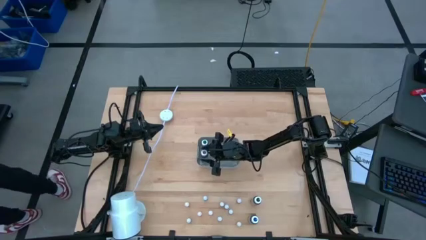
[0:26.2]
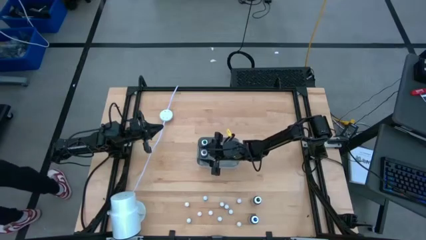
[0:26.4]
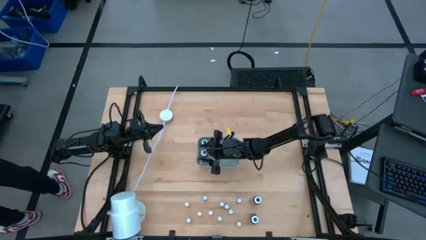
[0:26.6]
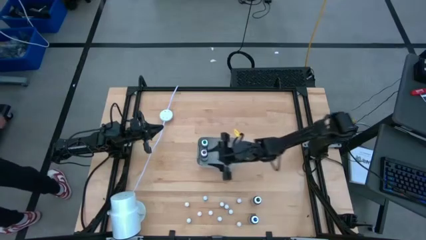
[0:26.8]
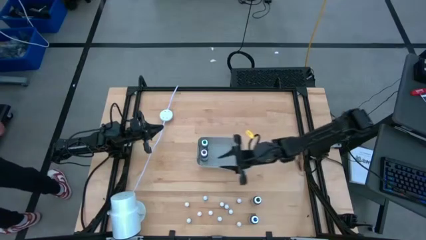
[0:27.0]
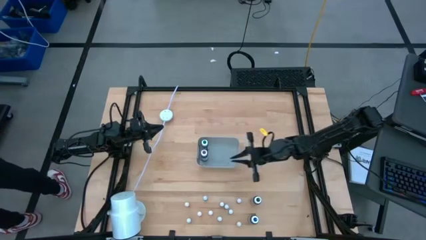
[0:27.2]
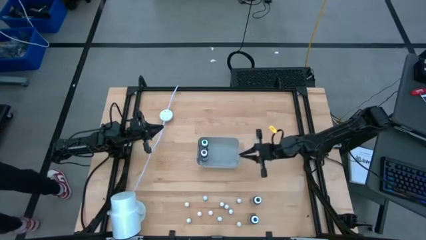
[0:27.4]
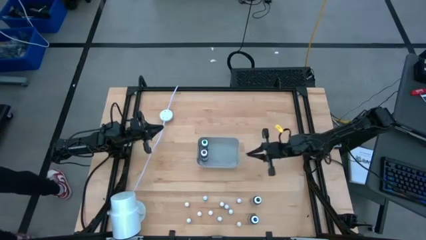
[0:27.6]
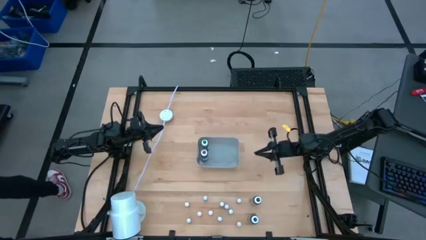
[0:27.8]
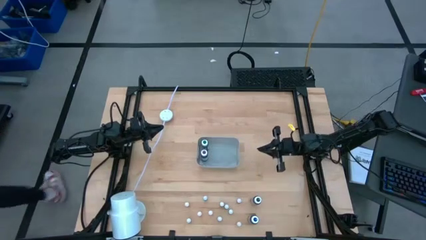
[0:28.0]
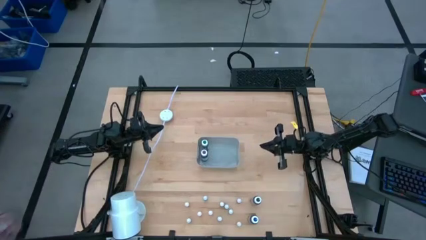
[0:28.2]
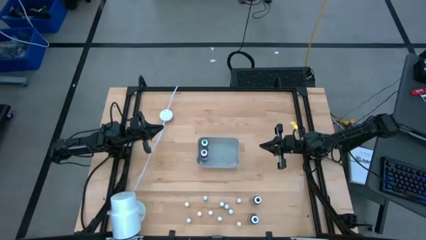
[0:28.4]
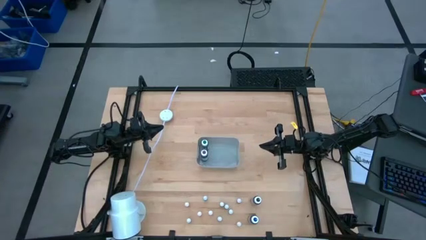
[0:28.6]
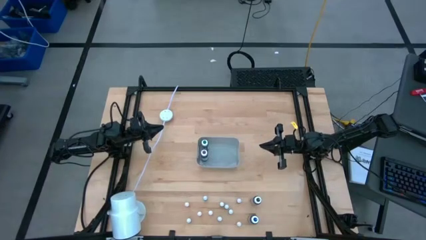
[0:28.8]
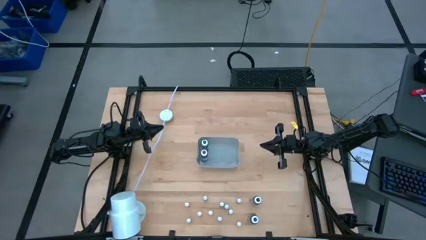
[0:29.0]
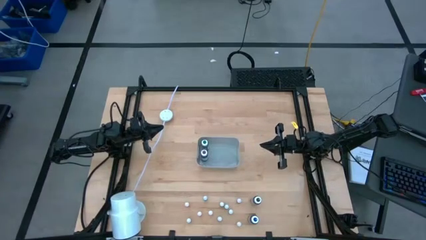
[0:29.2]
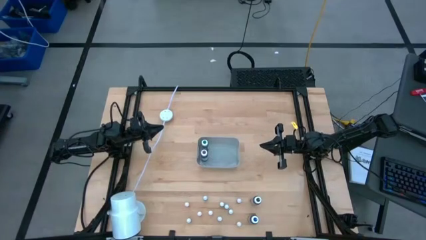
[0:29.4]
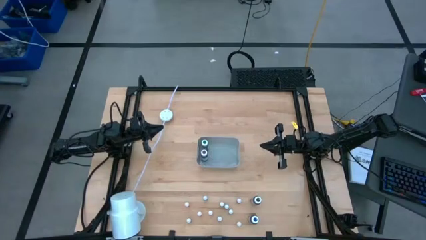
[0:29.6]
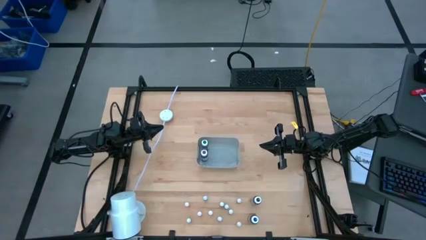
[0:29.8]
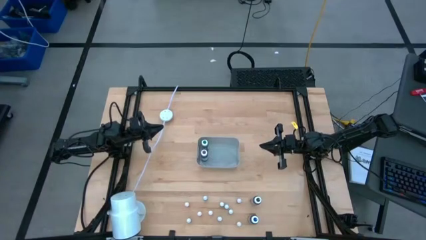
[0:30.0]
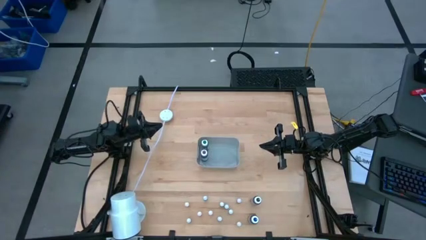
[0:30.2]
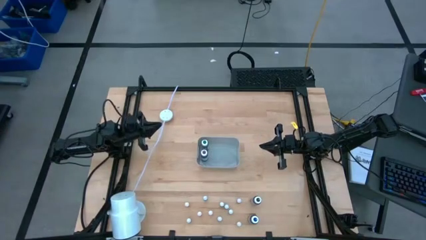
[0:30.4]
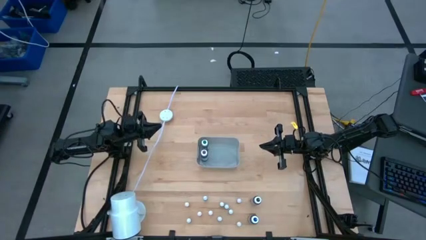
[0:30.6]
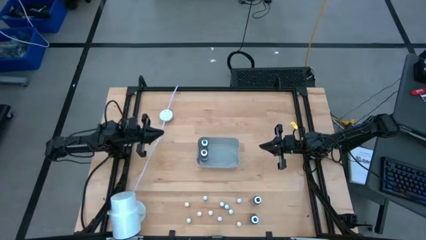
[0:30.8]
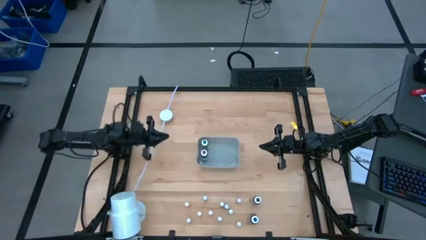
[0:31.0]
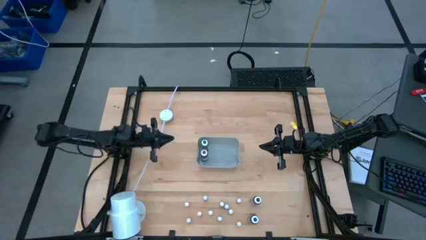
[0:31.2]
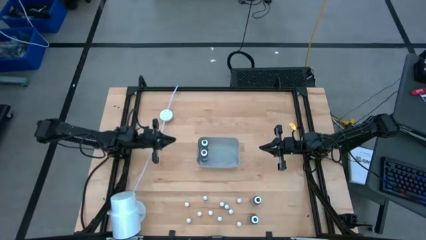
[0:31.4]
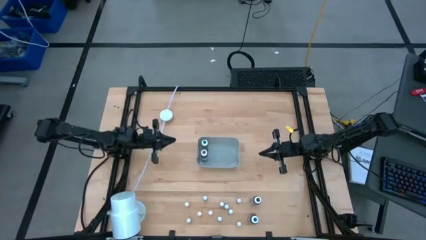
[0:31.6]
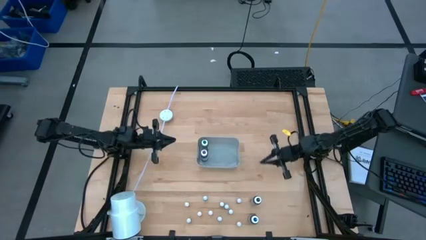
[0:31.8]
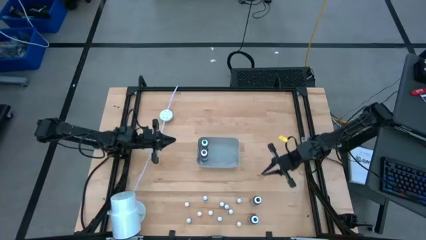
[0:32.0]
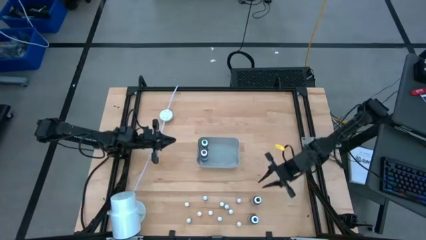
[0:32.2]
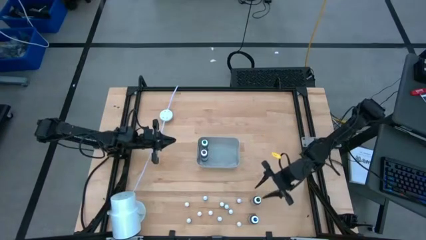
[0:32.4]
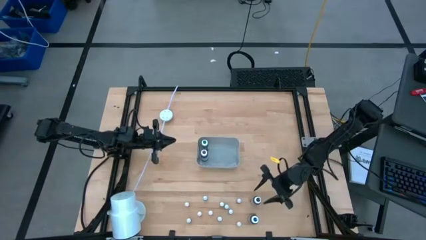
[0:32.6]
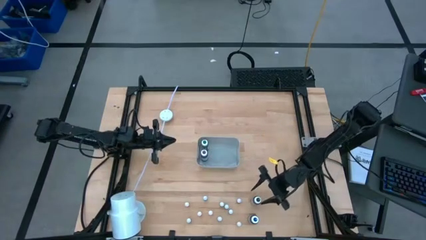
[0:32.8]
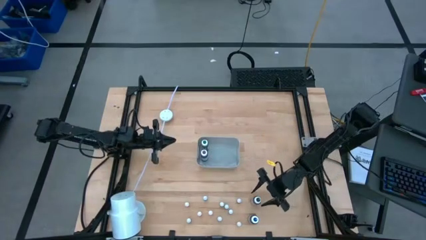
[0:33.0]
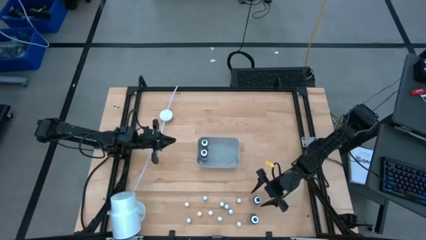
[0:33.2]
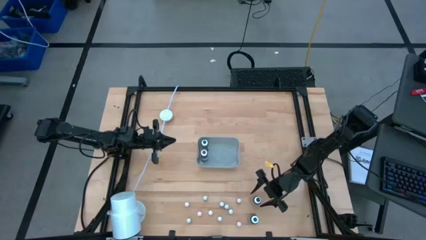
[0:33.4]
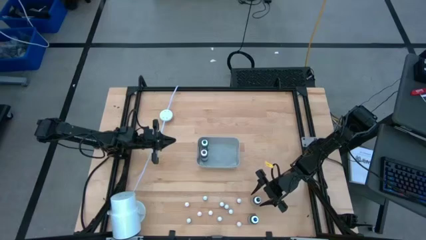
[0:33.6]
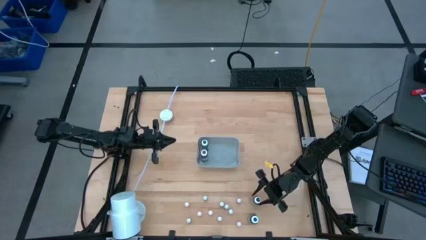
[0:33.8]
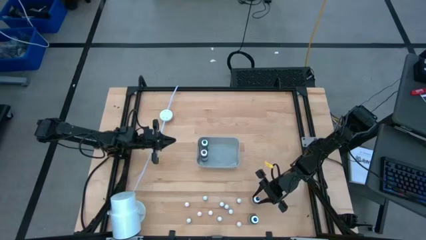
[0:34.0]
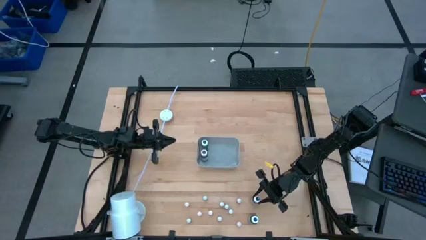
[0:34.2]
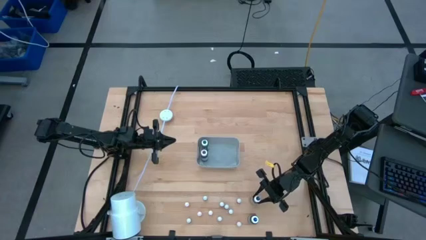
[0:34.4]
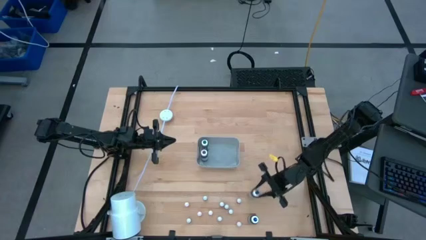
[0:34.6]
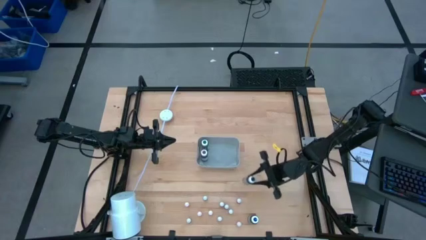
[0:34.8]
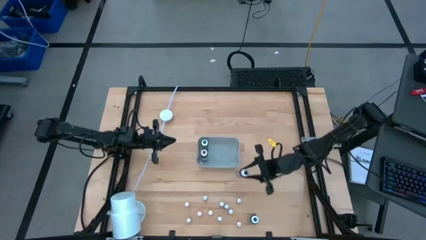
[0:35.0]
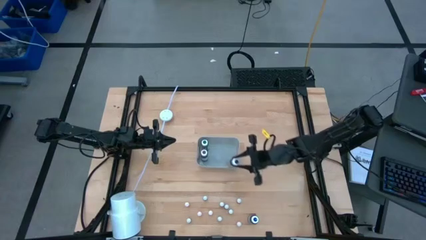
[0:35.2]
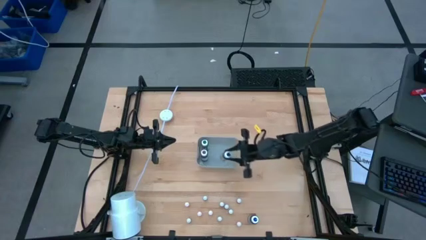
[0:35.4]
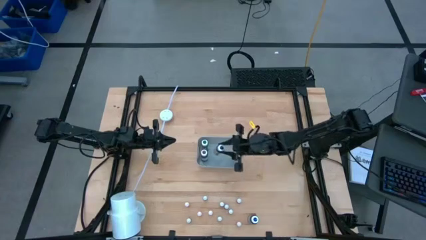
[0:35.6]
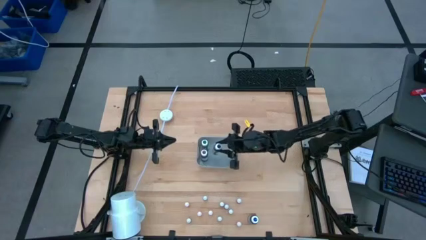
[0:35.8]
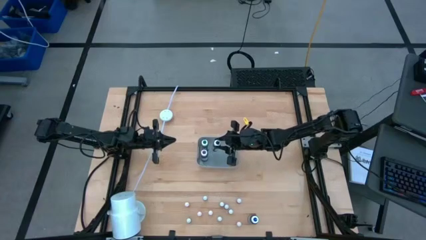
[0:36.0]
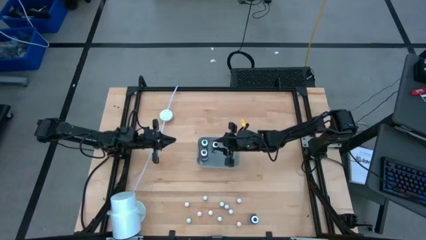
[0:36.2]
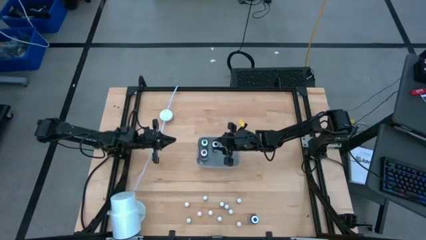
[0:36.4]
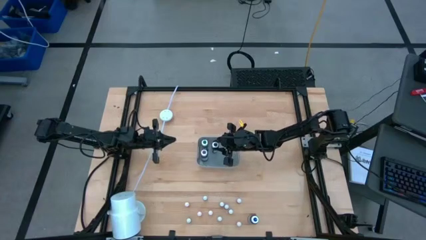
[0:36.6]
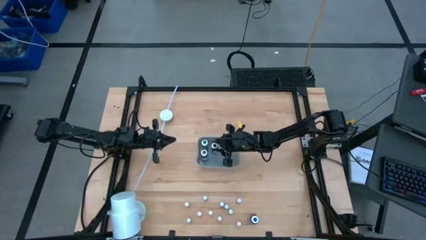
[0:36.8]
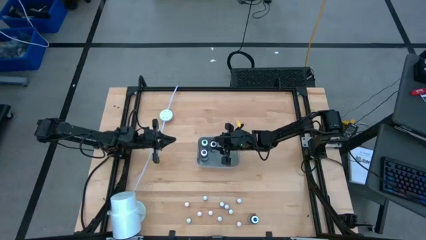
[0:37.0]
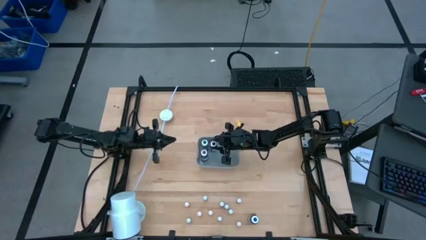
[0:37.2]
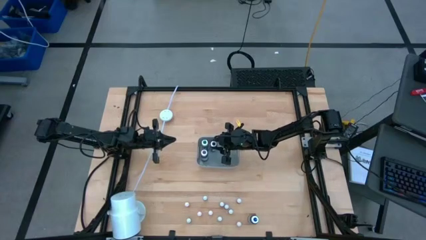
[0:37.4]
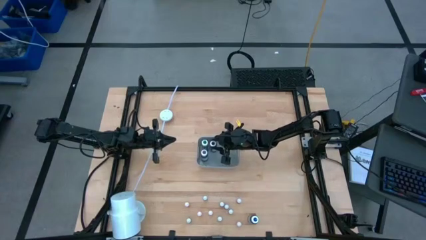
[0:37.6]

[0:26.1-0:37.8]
Task: Pick & Place food coloring
Put the large black food coloring bottle into the gray container

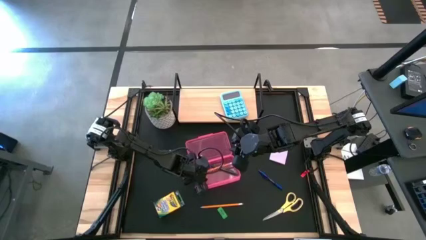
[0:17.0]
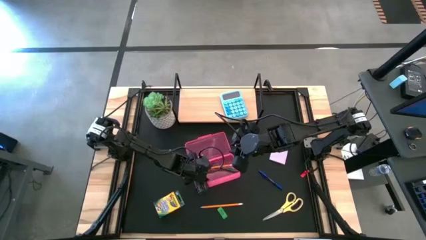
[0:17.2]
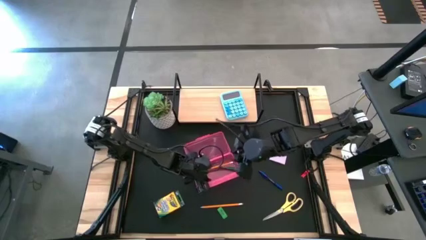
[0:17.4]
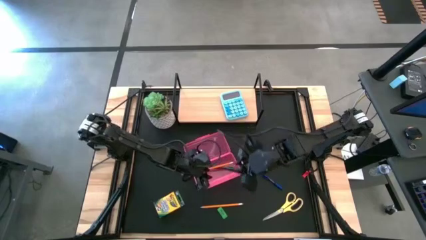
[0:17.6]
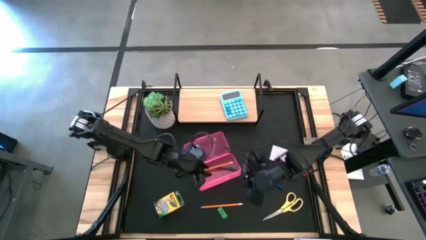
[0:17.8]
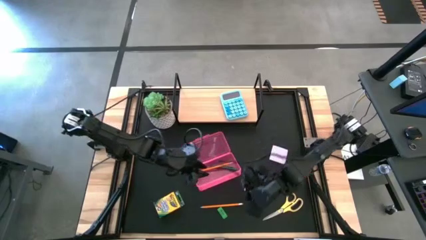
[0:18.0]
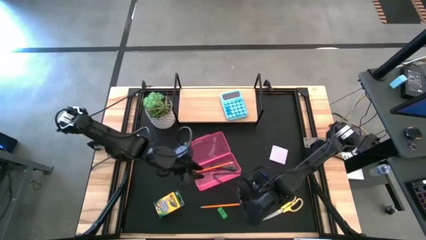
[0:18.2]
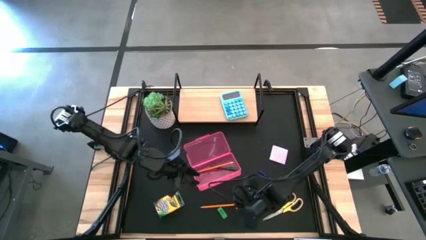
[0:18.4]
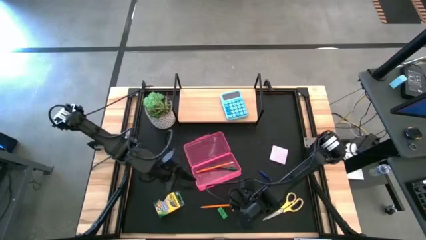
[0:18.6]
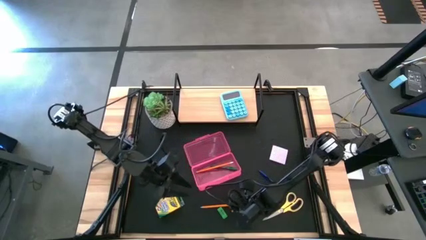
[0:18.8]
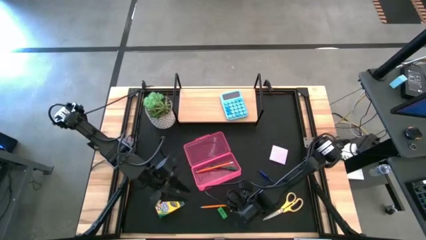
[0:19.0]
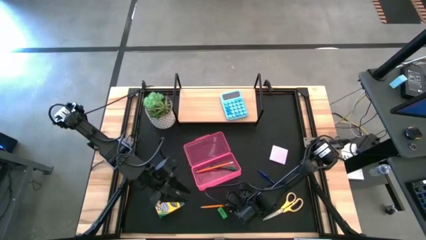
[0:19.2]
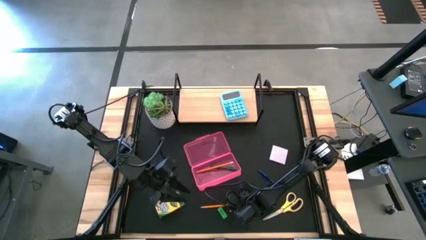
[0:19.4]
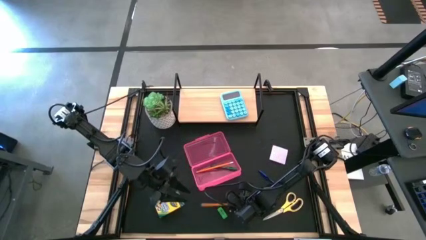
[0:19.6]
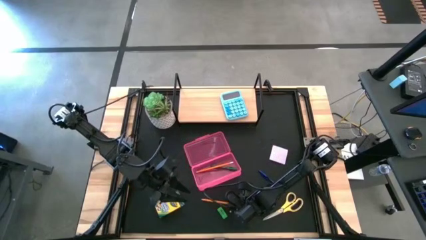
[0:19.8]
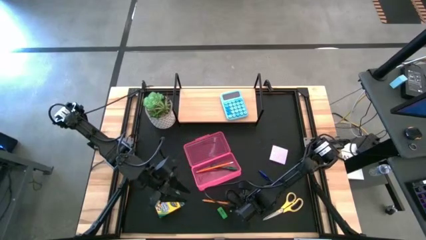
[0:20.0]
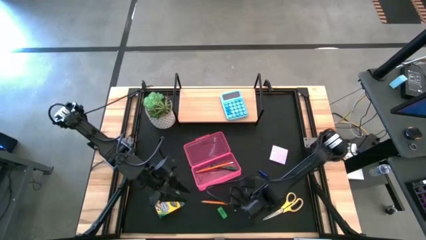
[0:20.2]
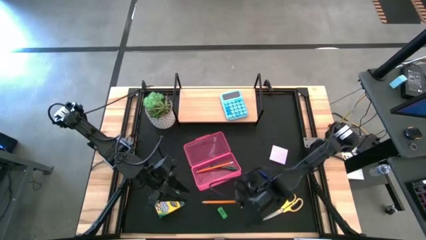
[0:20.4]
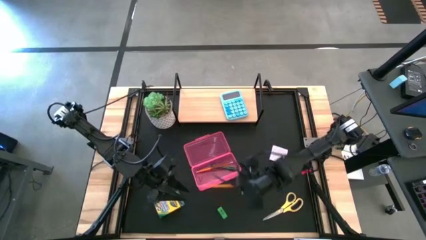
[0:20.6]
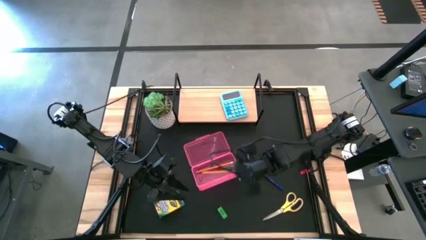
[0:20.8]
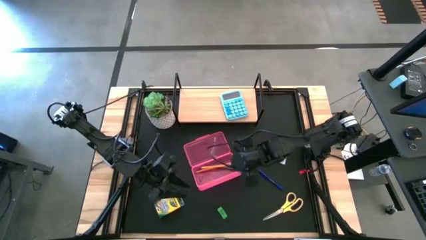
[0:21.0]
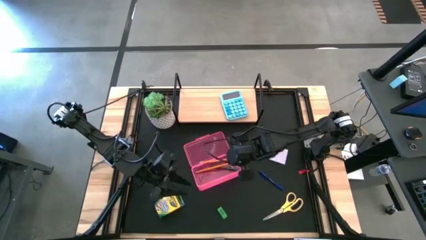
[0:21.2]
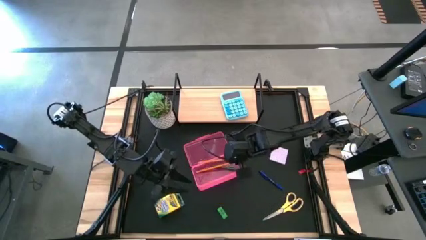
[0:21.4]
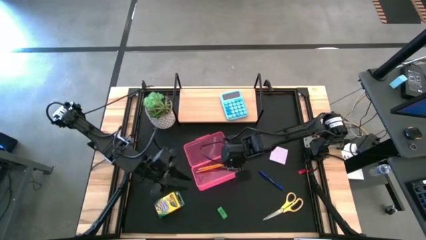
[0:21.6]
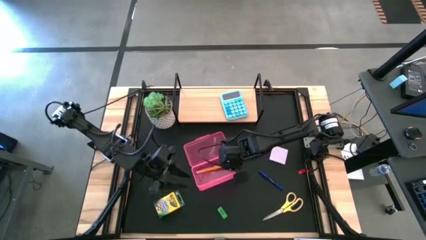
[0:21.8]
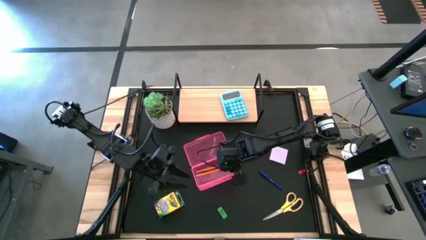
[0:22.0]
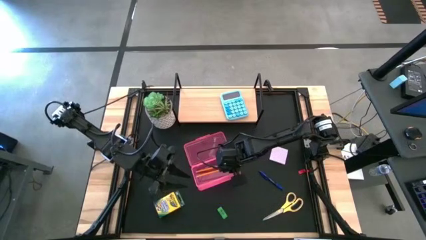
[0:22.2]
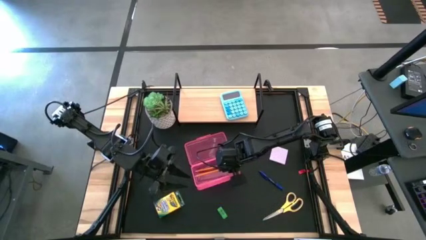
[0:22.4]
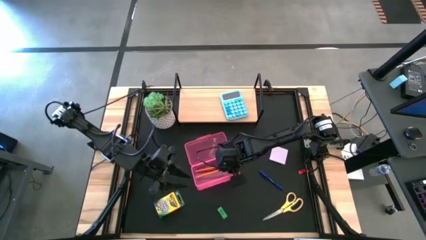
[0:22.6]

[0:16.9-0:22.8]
Task: Pack school essentials
Put the orange pencil into the red supply box
